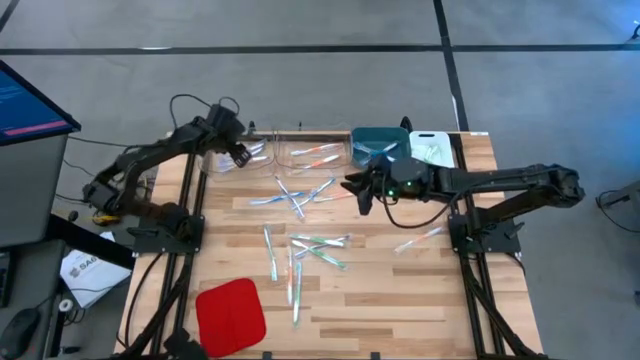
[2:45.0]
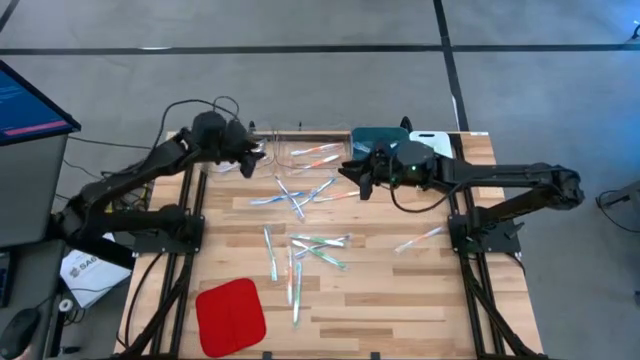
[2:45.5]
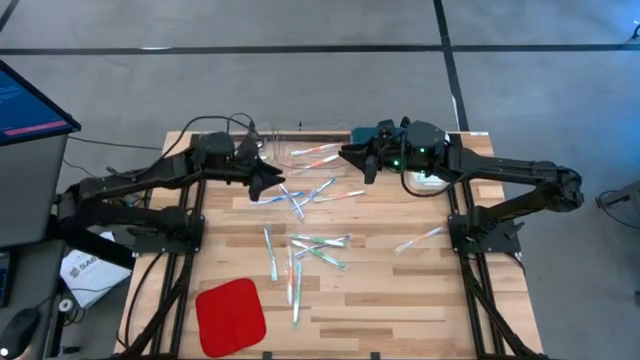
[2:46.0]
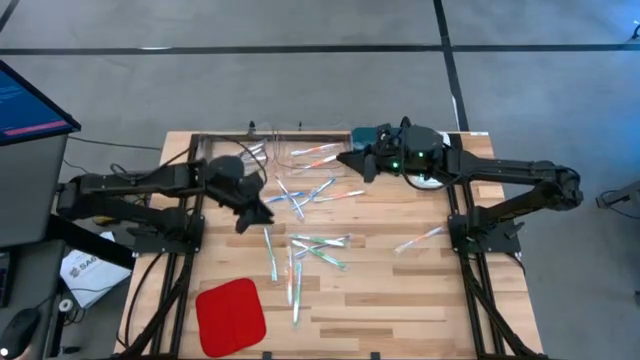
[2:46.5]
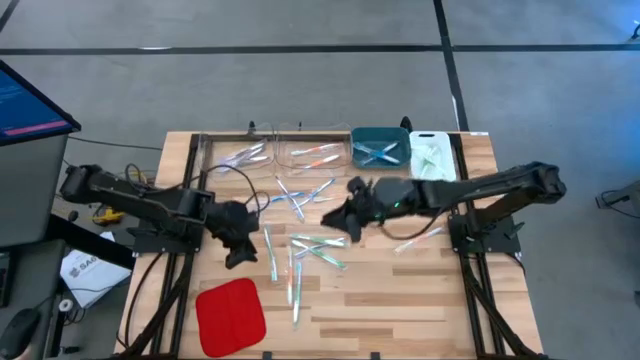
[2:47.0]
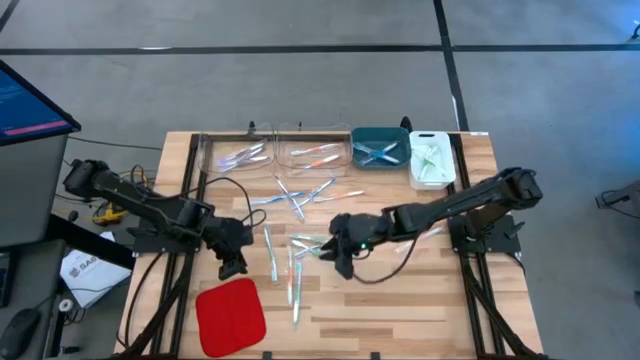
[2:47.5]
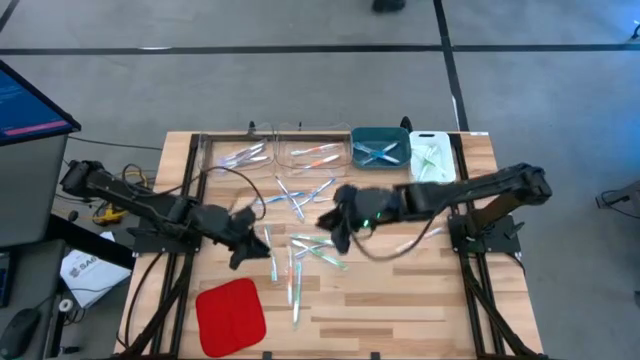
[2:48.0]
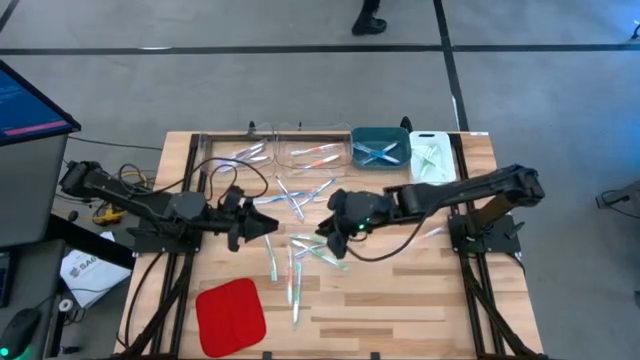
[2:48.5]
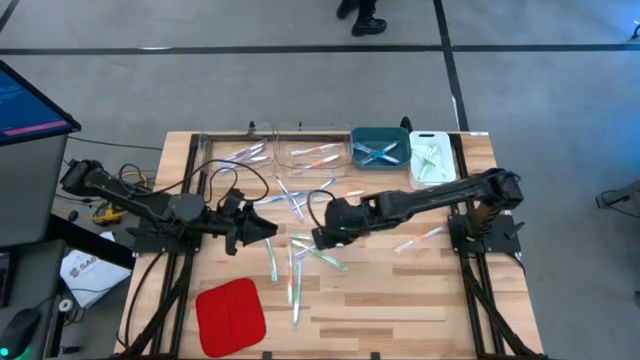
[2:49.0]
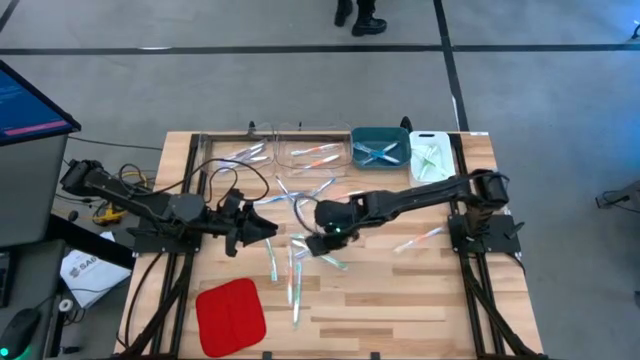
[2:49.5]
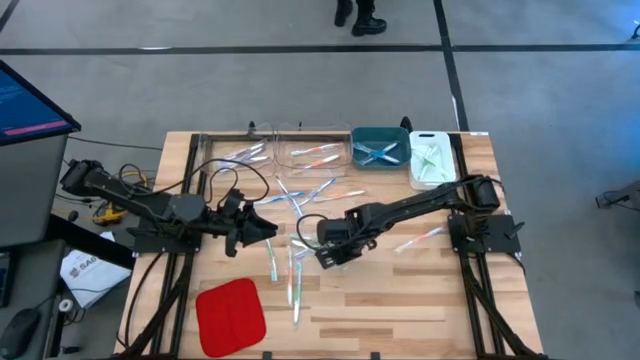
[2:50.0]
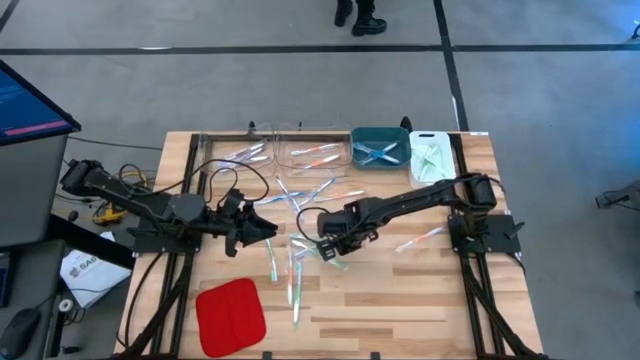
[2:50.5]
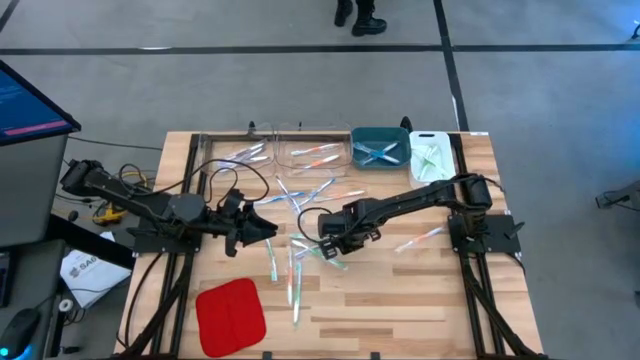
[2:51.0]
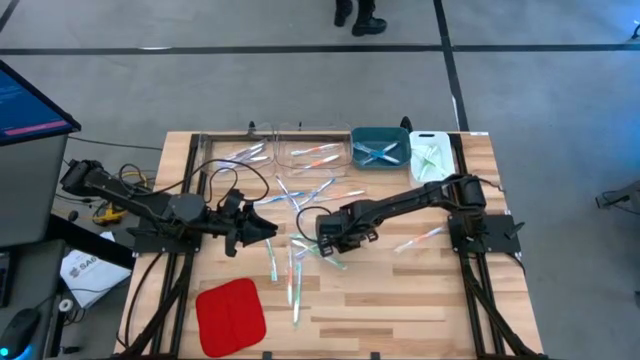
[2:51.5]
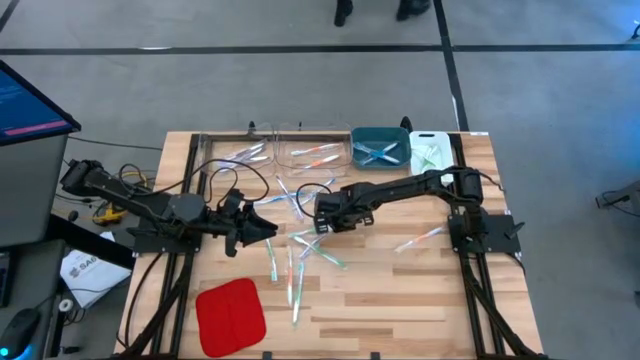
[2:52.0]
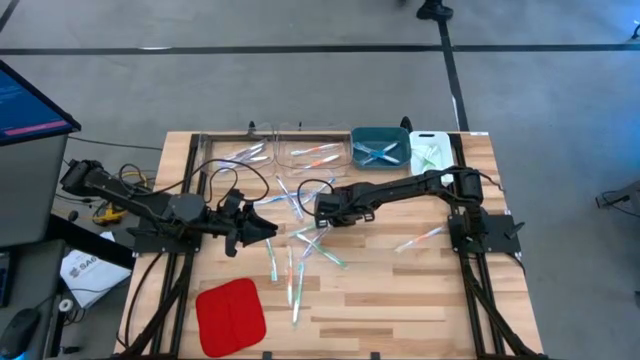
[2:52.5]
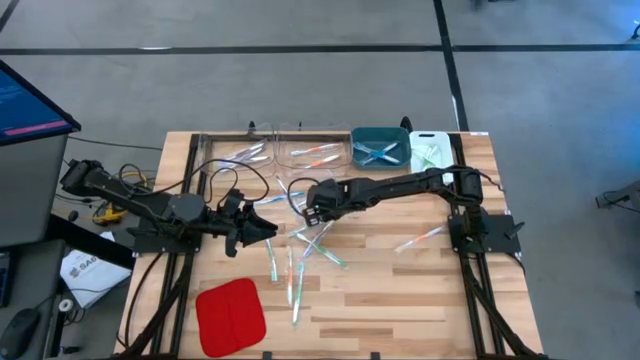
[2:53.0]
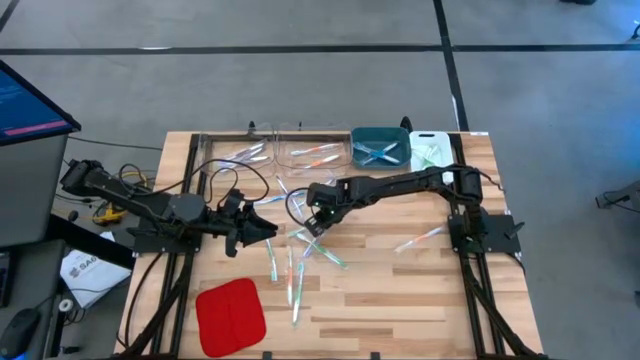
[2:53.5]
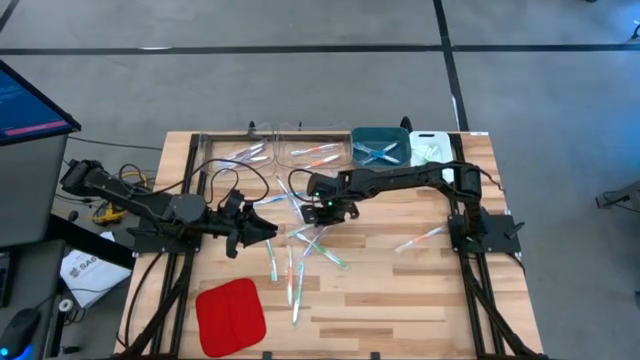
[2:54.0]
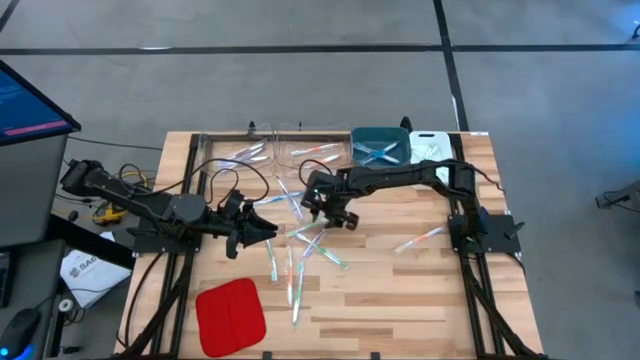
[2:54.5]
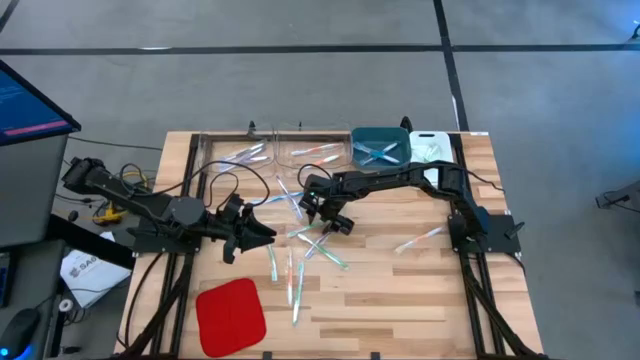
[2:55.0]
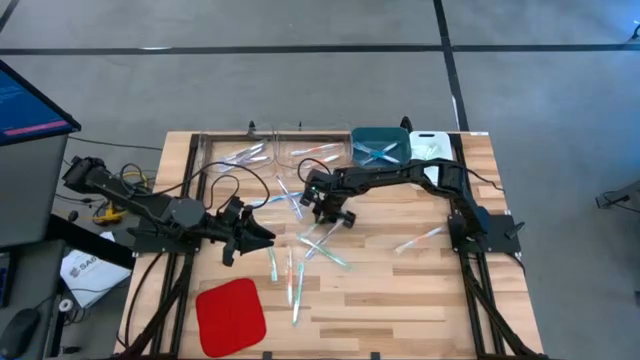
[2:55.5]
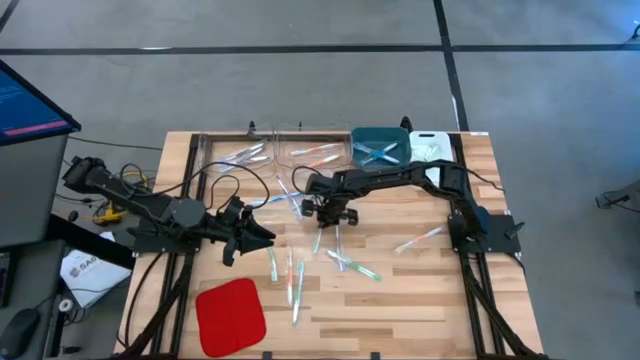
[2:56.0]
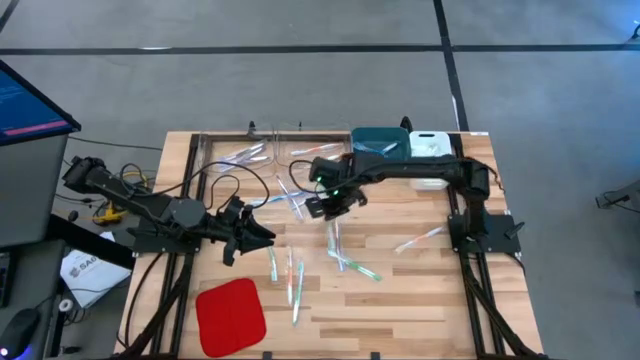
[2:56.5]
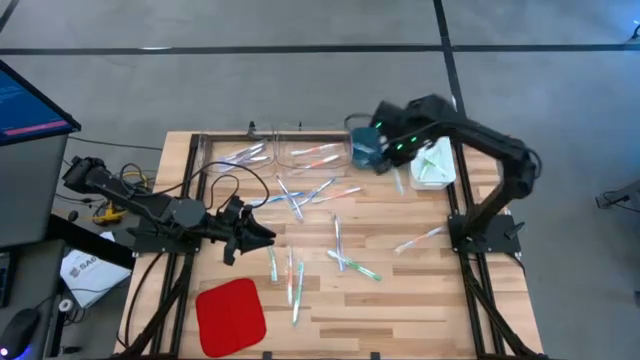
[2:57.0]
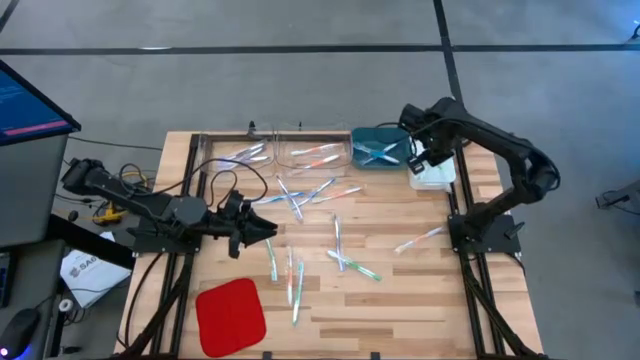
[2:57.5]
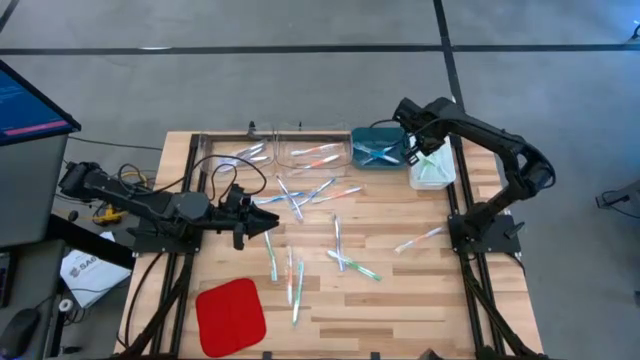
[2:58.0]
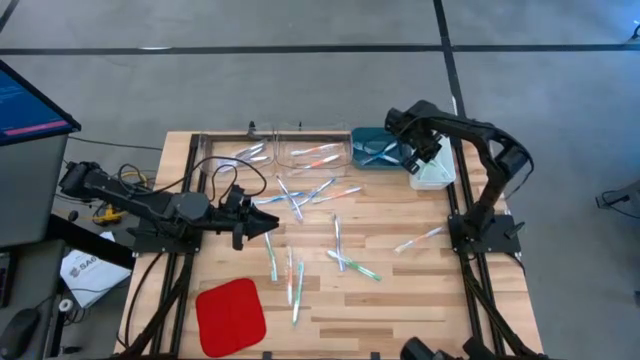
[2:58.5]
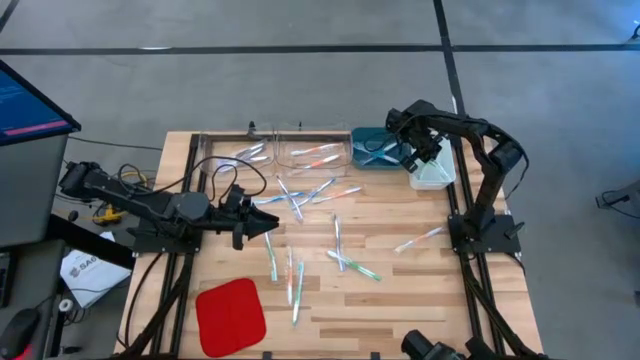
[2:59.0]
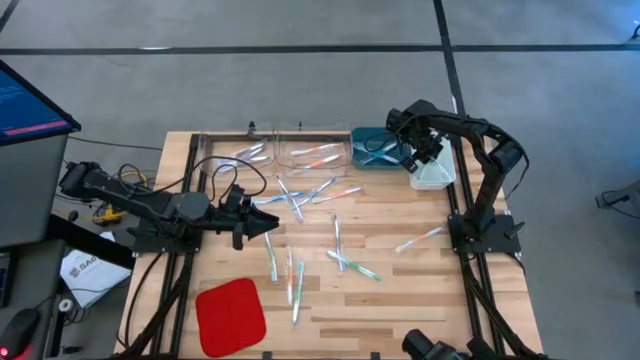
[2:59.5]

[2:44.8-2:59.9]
Task: Pick & Place Toothbrushes
Put the green toothbrush into the white bin

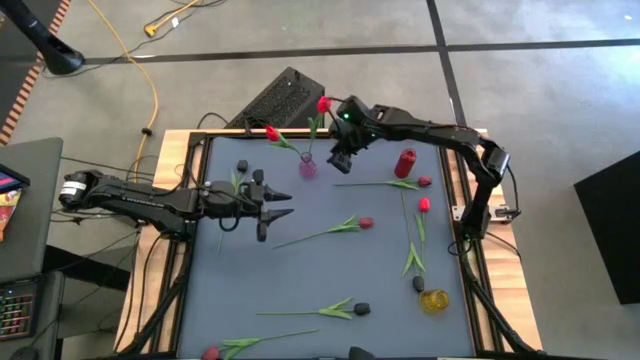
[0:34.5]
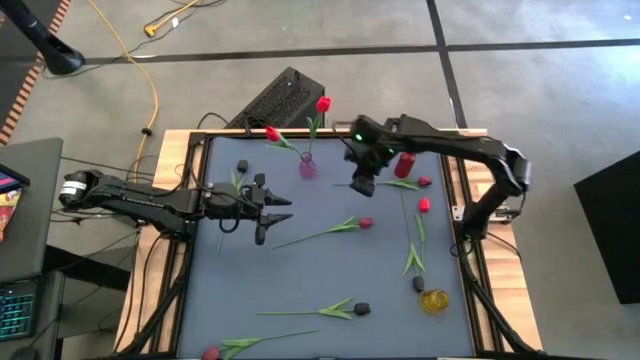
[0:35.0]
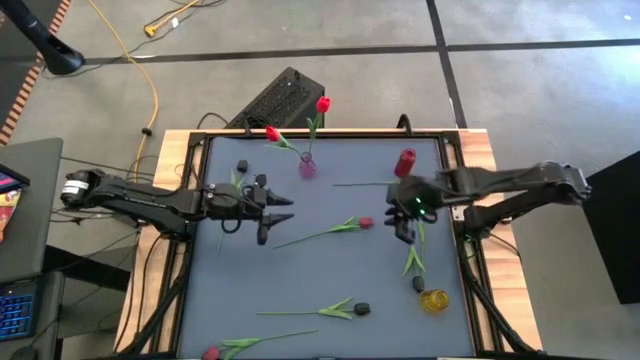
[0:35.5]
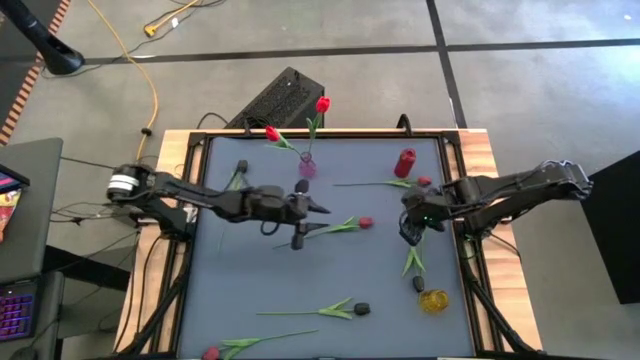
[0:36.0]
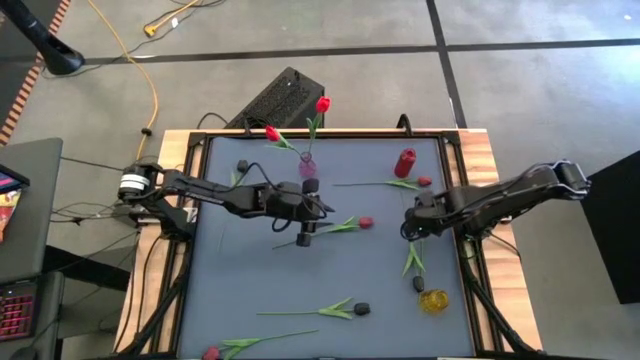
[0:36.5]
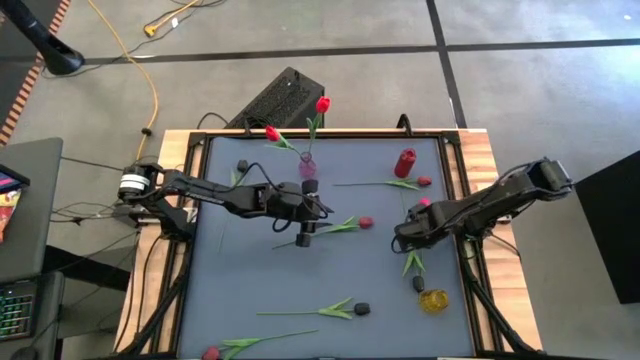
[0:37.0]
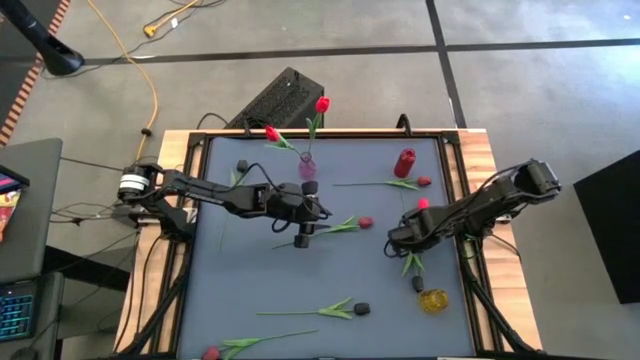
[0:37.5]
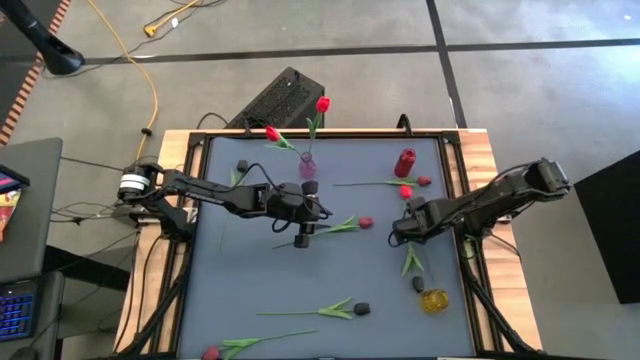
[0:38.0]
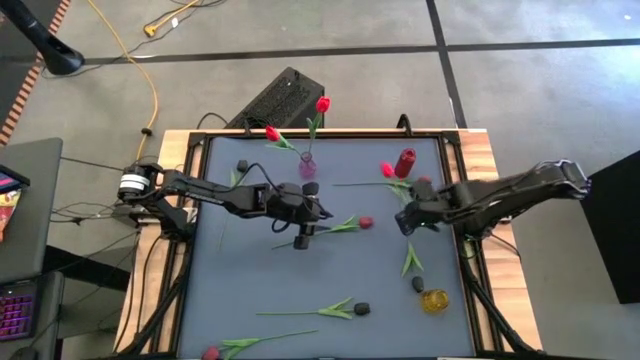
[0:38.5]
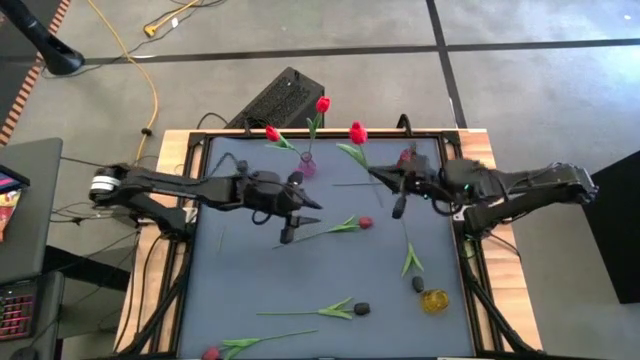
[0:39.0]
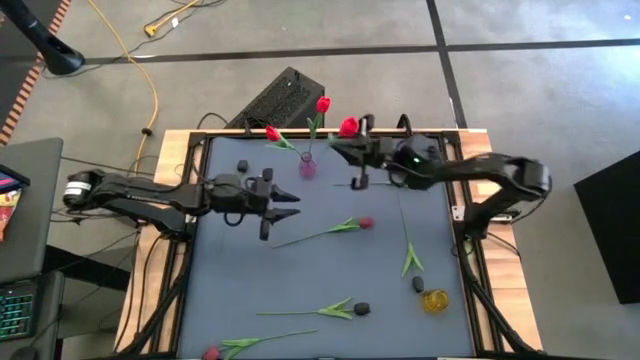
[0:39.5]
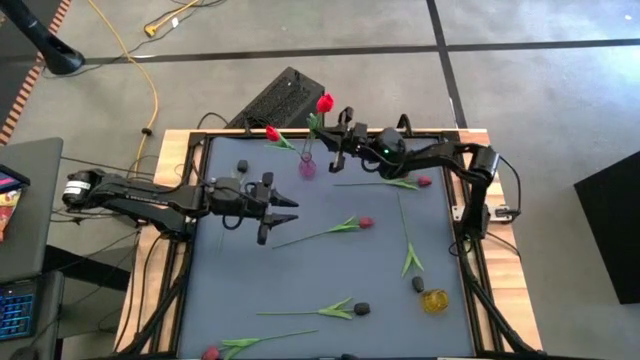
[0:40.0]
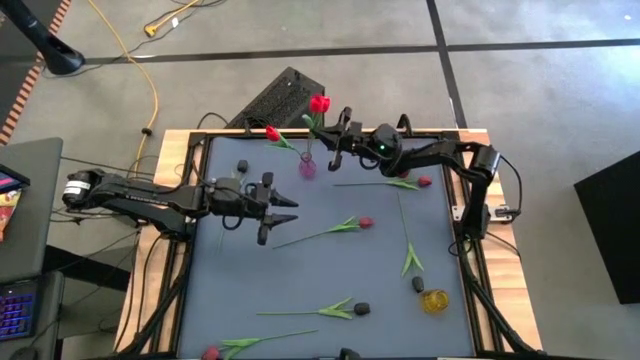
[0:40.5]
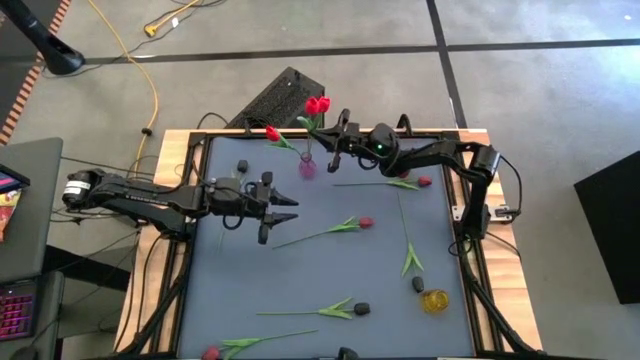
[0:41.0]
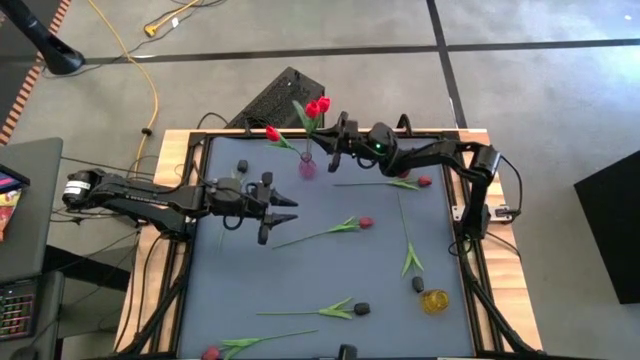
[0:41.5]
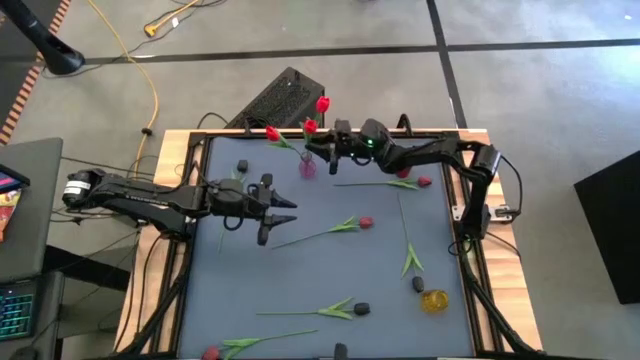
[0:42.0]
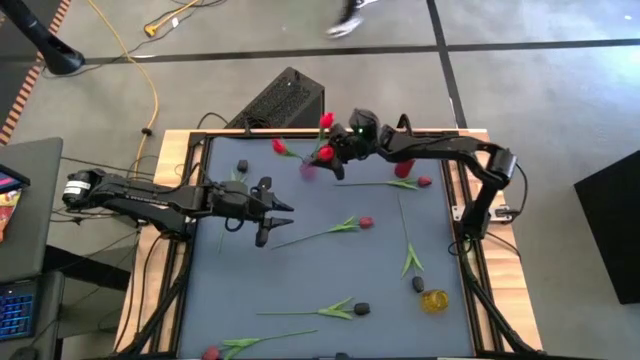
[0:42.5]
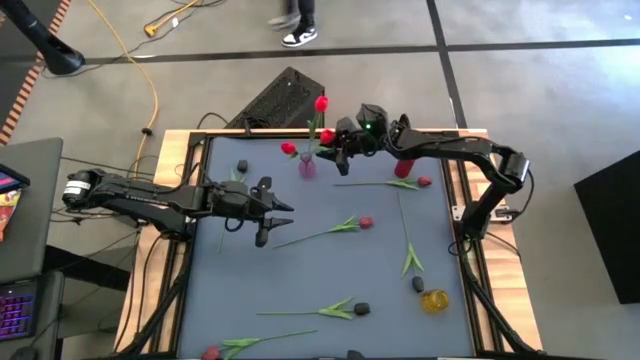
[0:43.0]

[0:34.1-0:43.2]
Task: Sort flowers into vase by color
Put the pink flower into the purple vase
